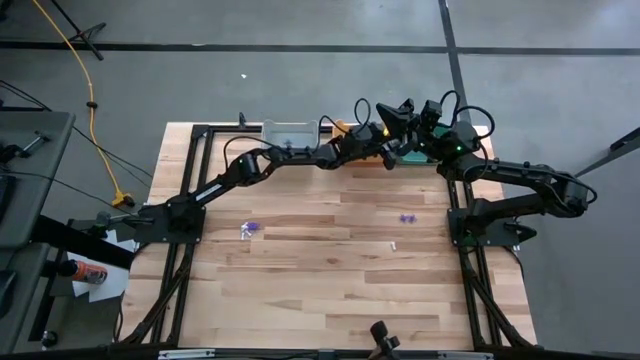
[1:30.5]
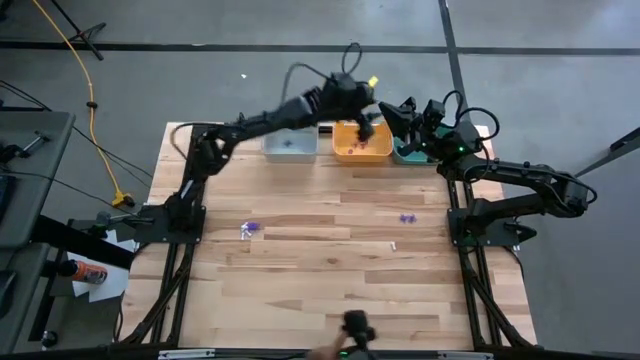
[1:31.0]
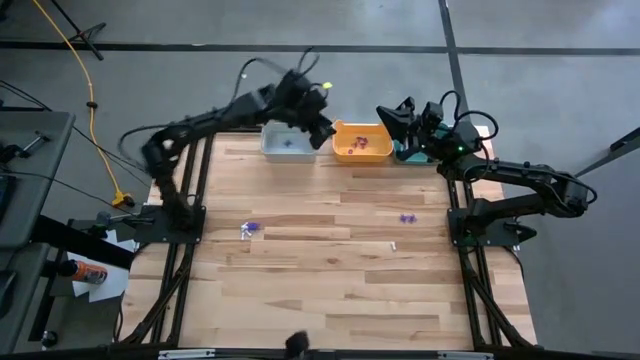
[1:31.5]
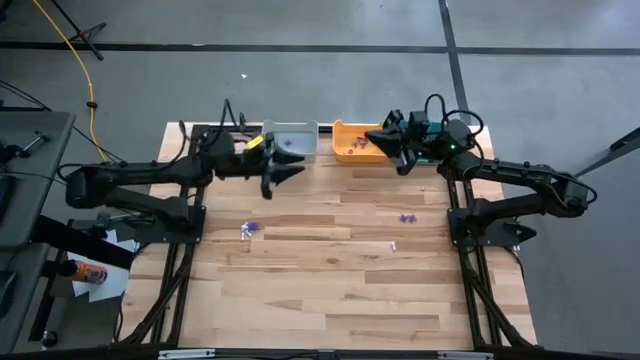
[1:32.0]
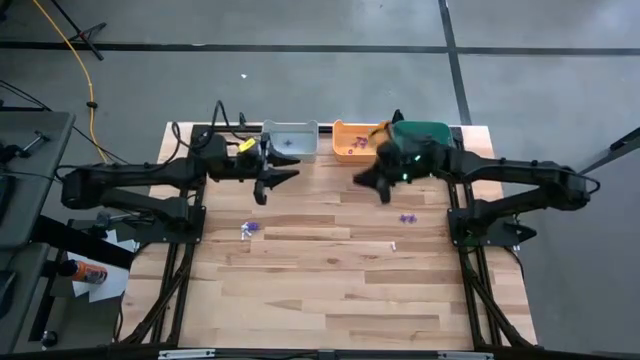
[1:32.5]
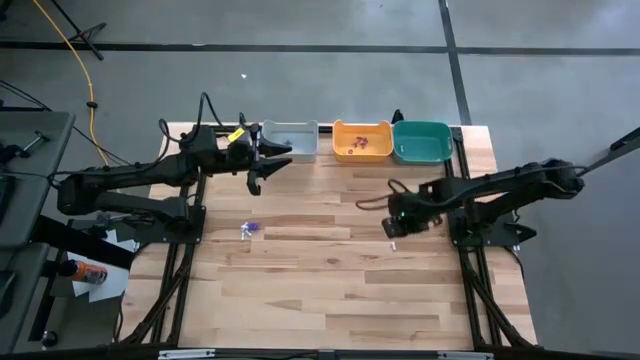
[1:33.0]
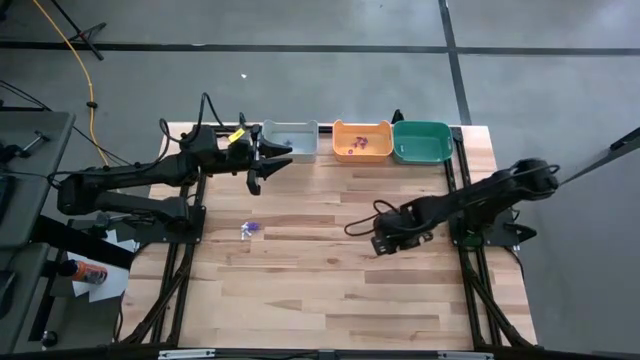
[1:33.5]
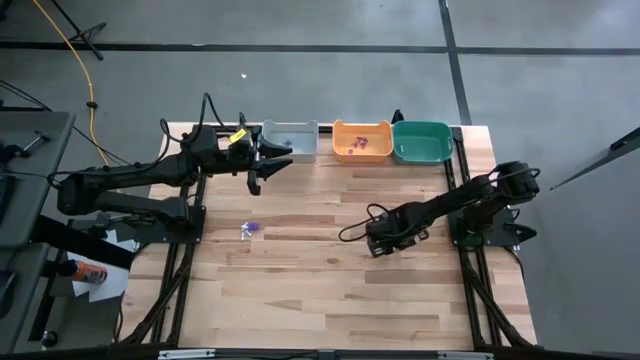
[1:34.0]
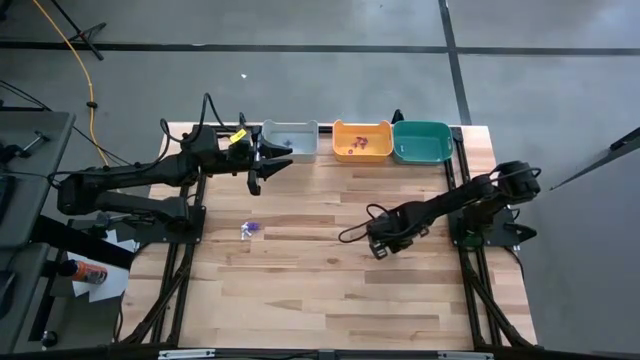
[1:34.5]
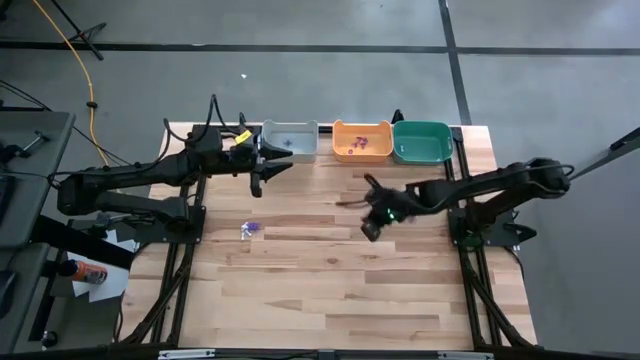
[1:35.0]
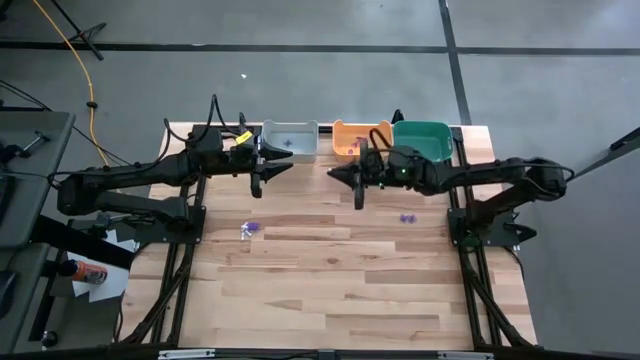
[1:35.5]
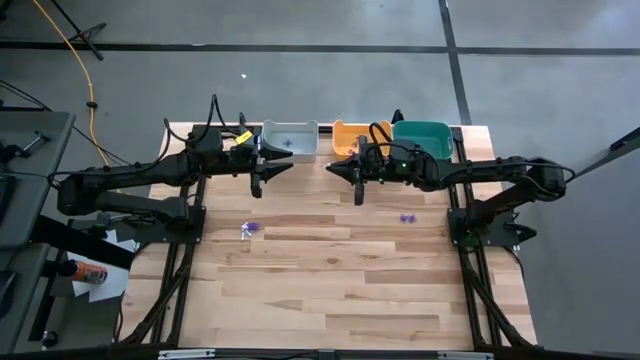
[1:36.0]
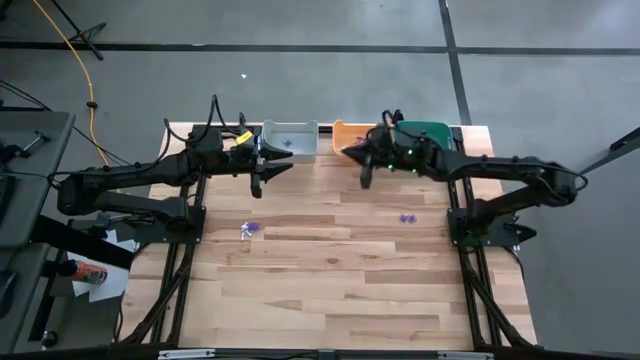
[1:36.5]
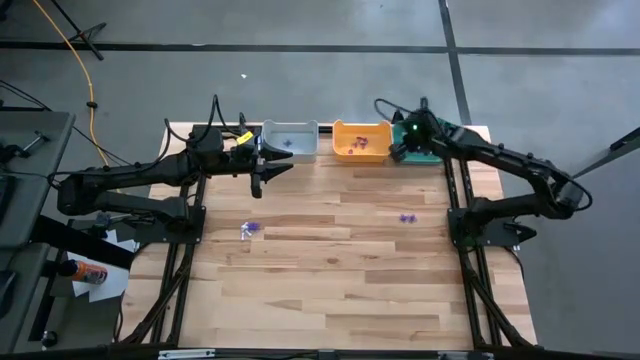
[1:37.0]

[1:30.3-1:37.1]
Task: Sort Halloween decoration
Put the white bone toy into the green bin

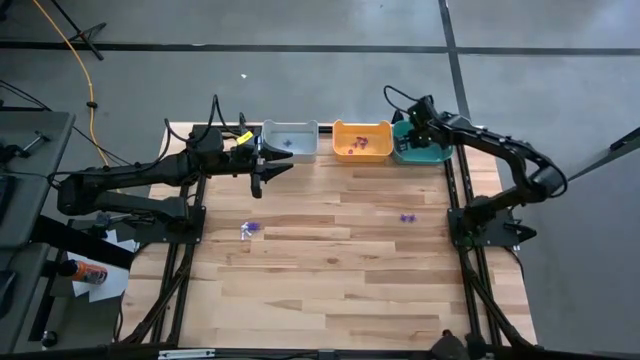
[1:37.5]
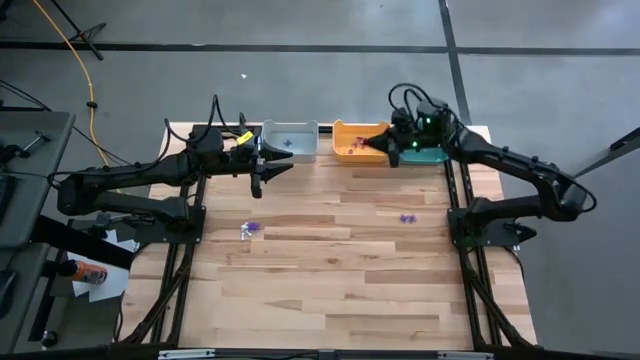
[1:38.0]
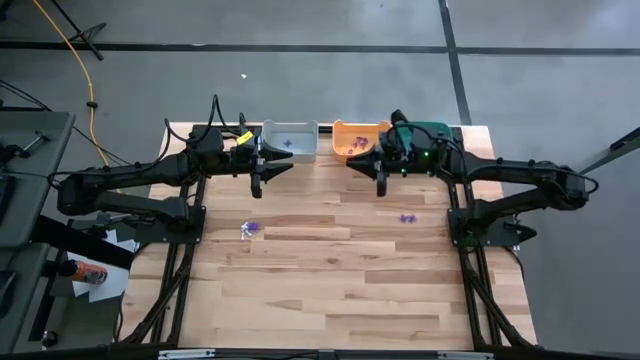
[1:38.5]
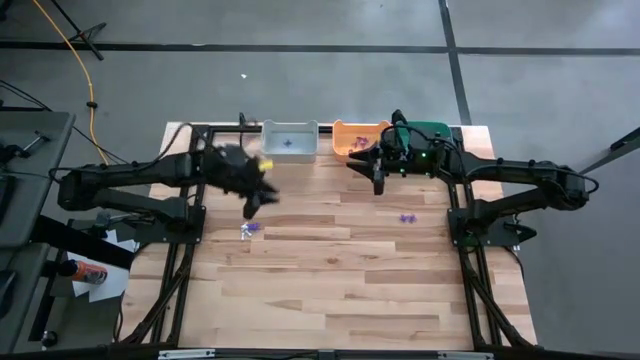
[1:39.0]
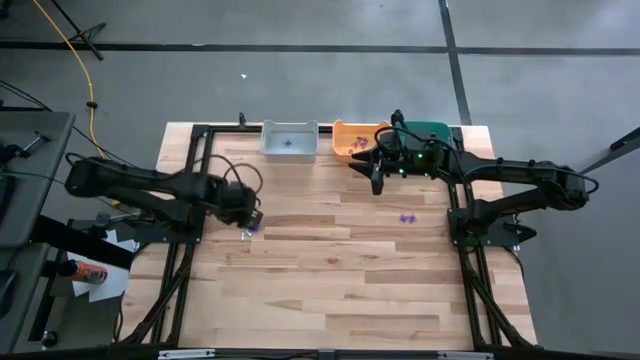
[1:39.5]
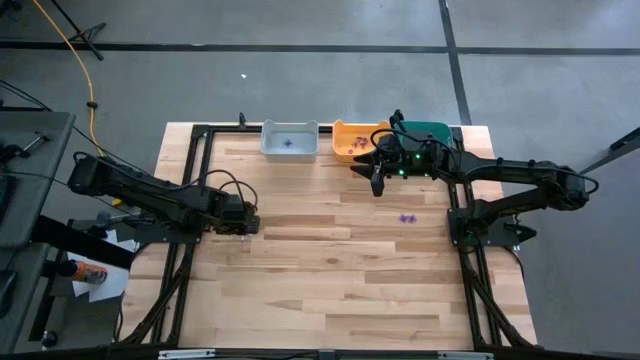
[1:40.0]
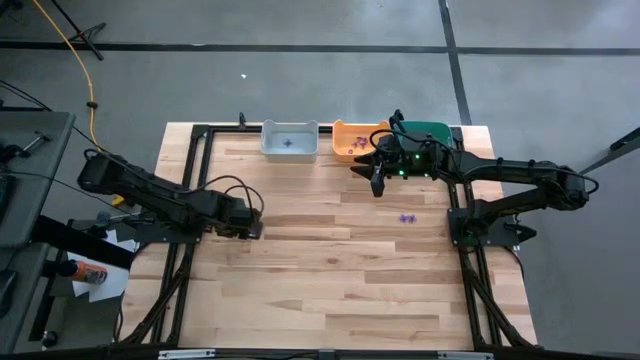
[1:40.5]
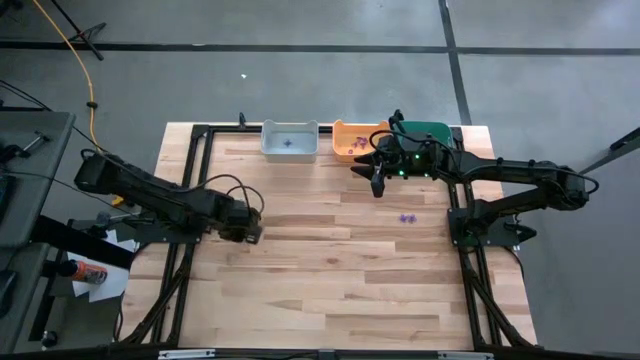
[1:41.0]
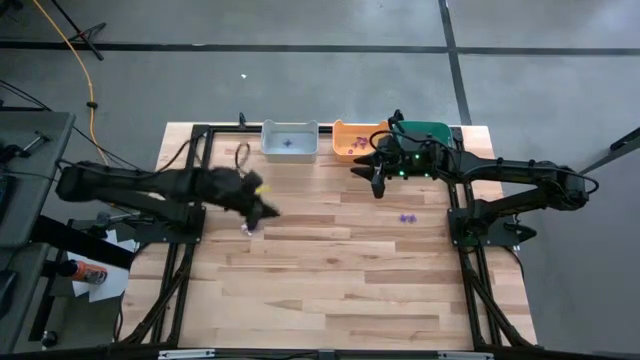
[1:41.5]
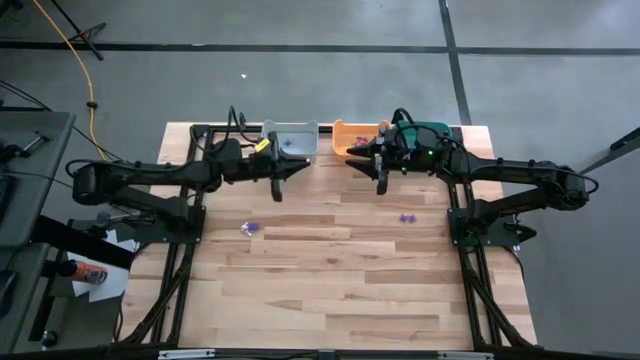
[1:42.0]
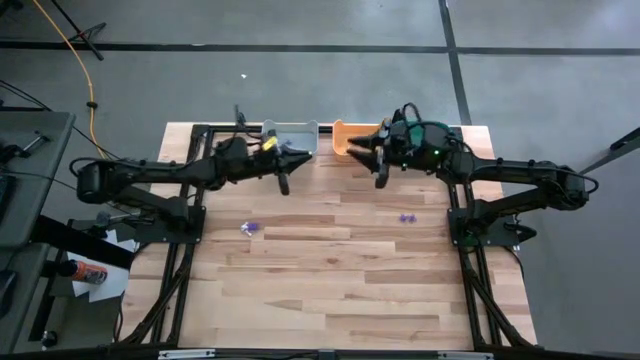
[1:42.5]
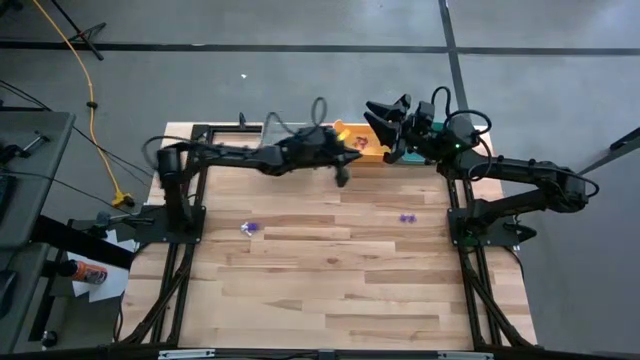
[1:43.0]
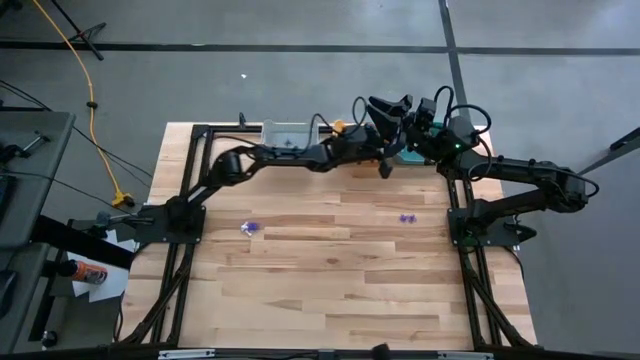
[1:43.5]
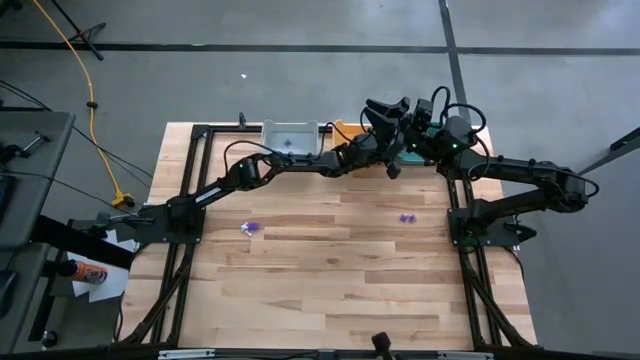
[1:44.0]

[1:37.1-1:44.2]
Put the white bone toy into the green bin

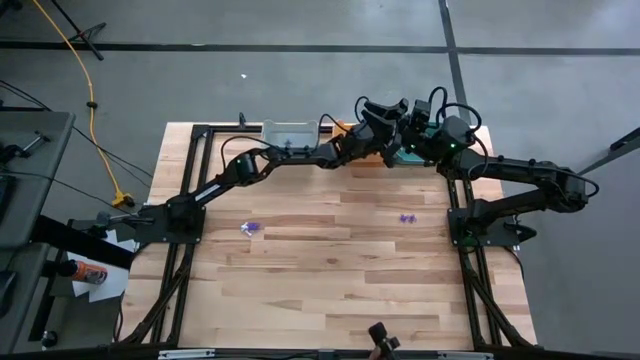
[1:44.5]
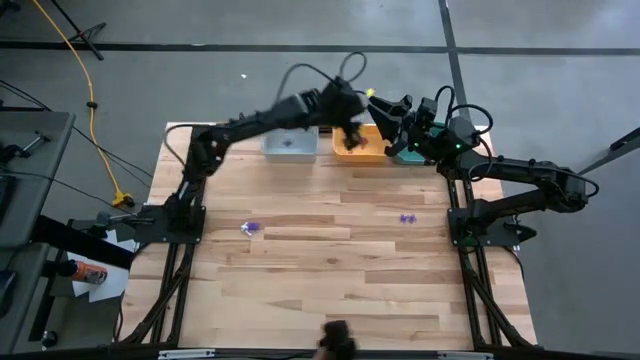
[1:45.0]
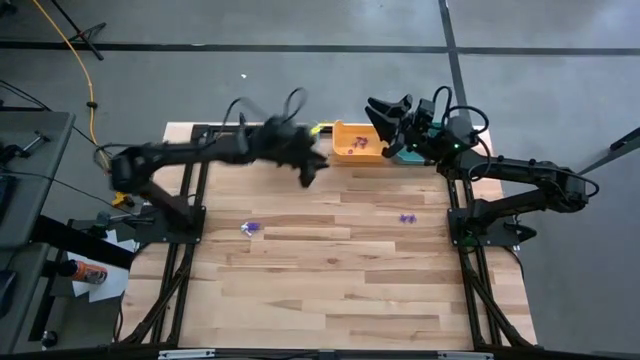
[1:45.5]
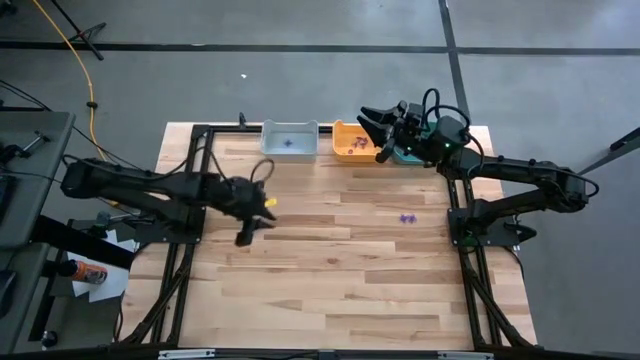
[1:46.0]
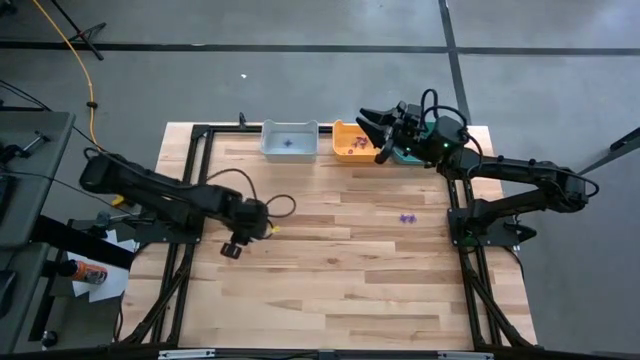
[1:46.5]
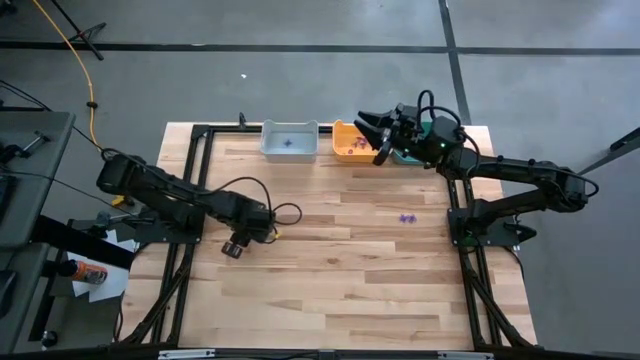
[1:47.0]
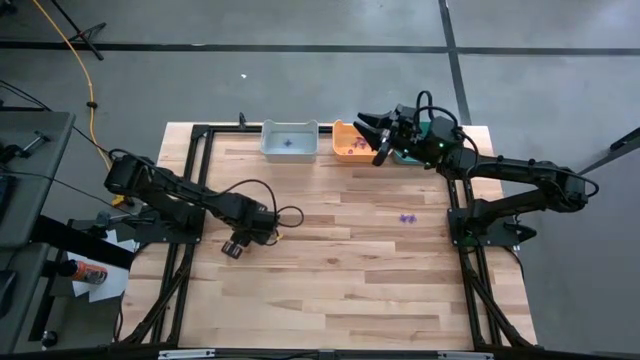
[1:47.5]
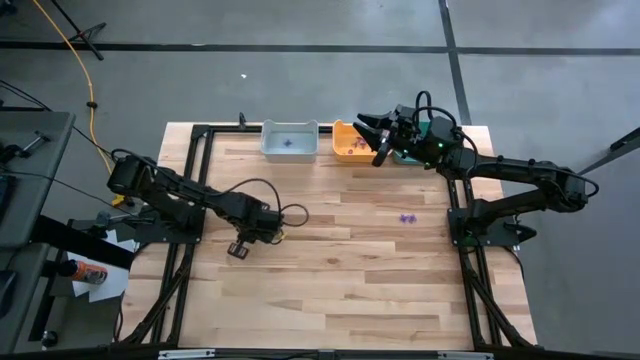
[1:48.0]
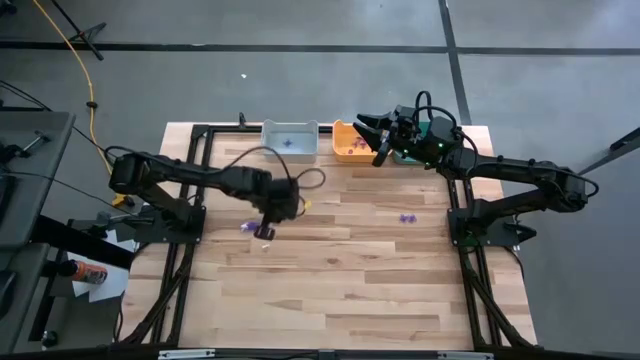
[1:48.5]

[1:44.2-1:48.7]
Put the white bone toy into the green bin
